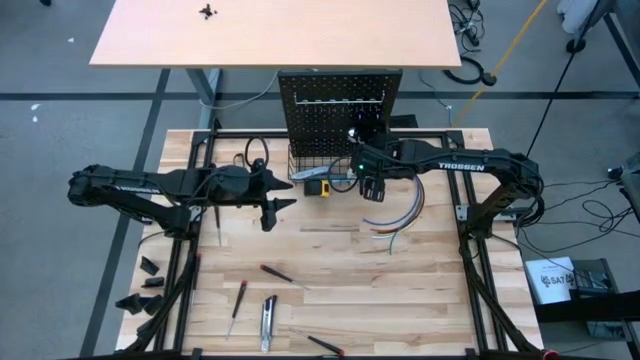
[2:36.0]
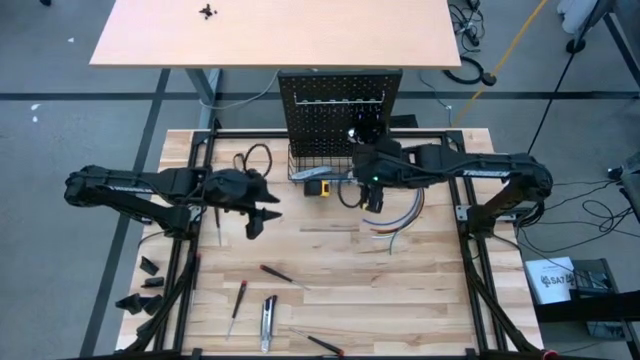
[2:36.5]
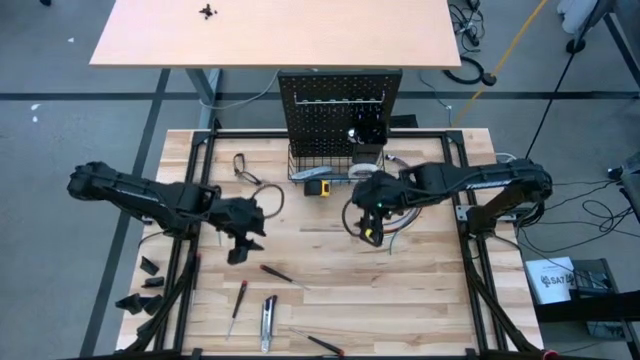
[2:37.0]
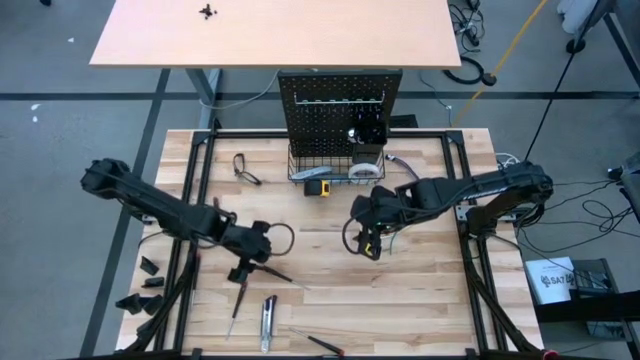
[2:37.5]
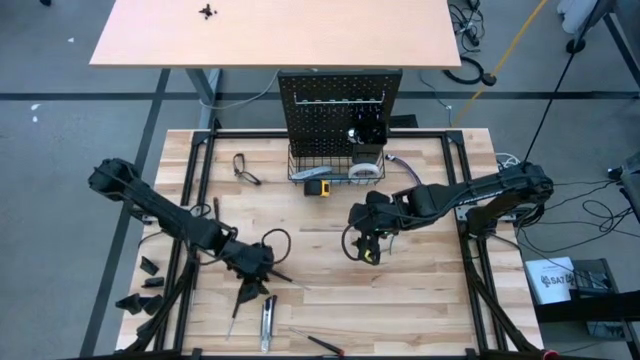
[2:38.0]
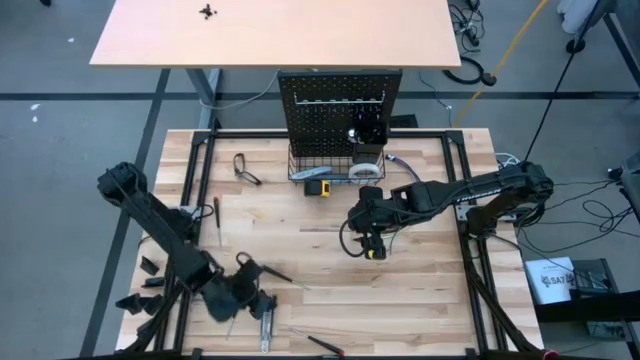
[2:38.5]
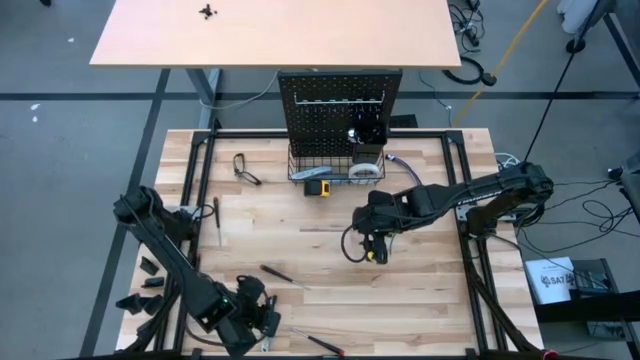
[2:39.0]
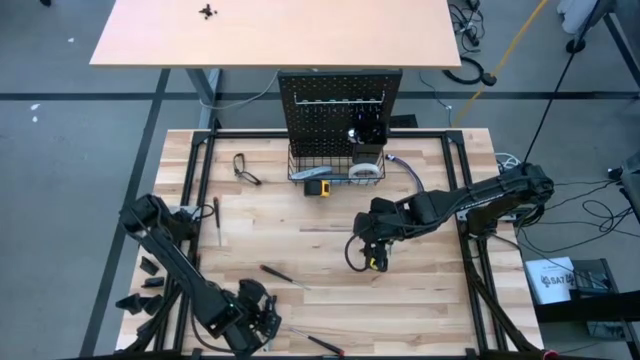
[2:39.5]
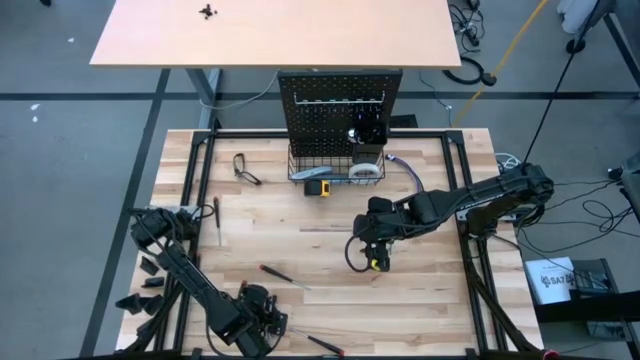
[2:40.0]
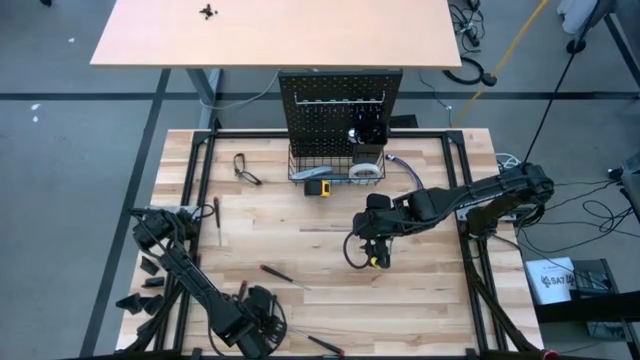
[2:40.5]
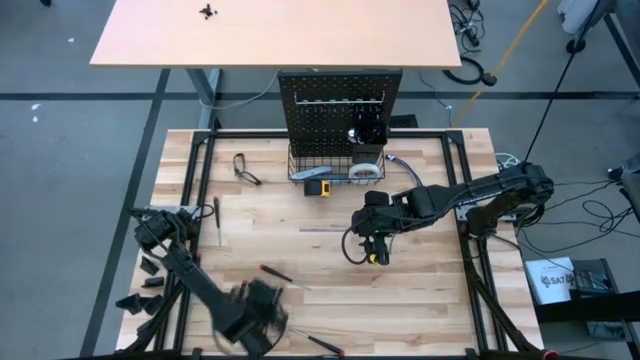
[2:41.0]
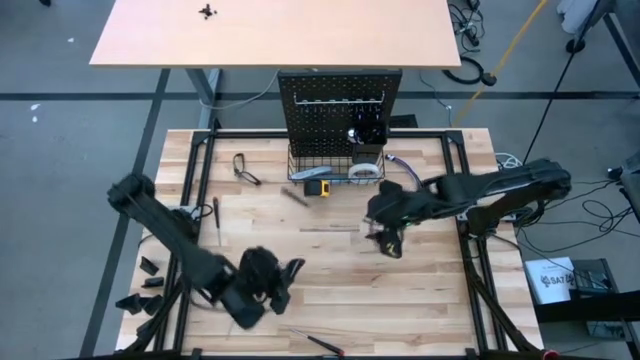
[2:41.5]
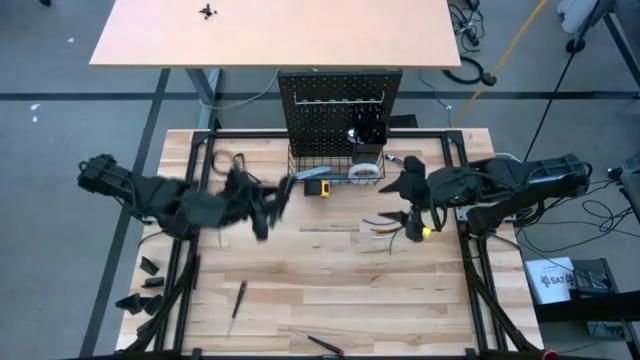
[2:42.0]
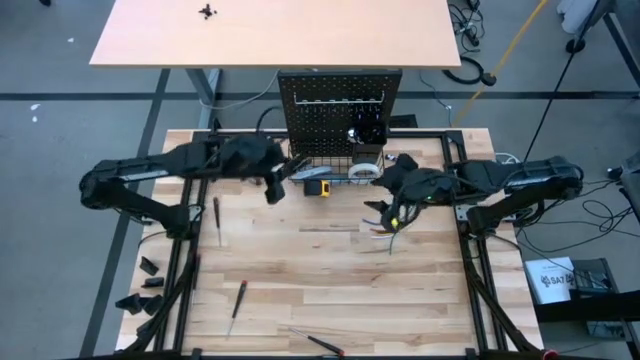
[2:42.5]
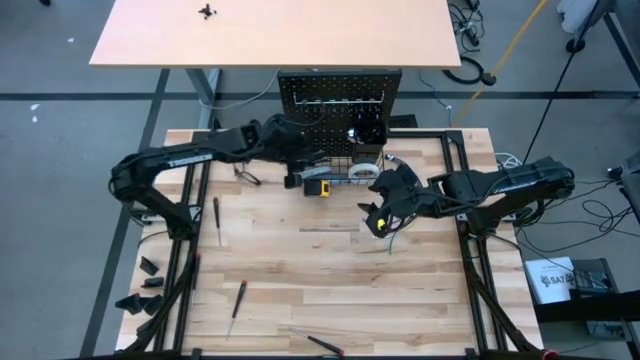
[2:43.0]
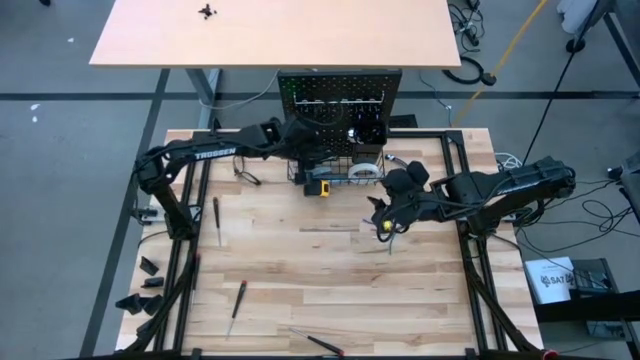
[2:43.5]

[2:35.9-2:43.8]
Task: Hang tools onto peg board
Put the black cutter into the wire basket on the pegboard

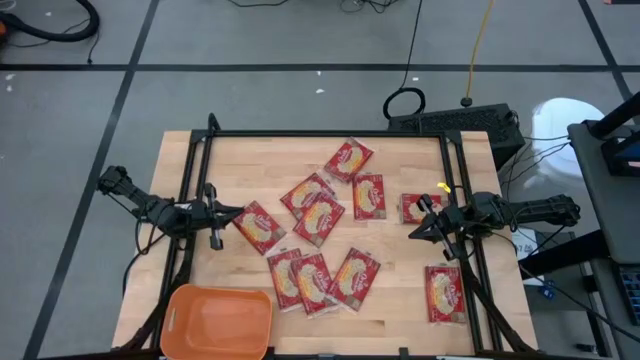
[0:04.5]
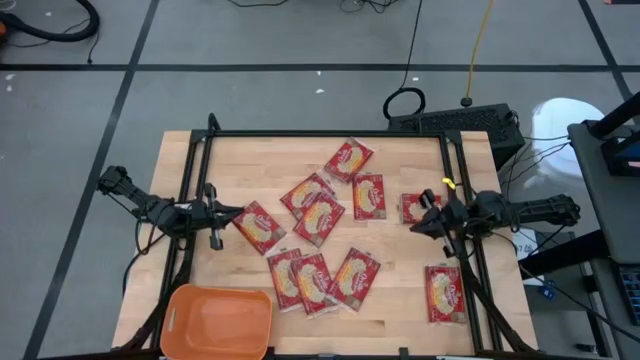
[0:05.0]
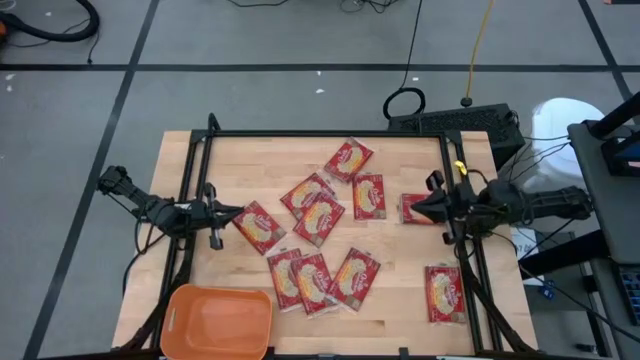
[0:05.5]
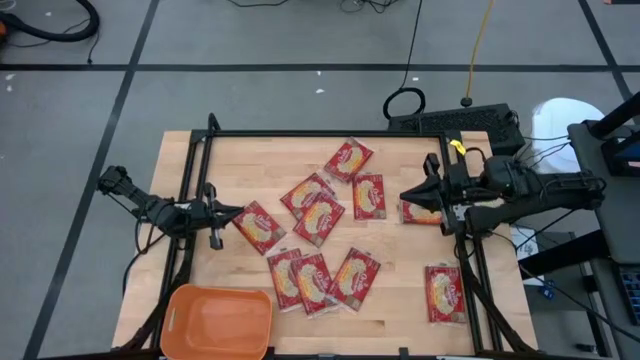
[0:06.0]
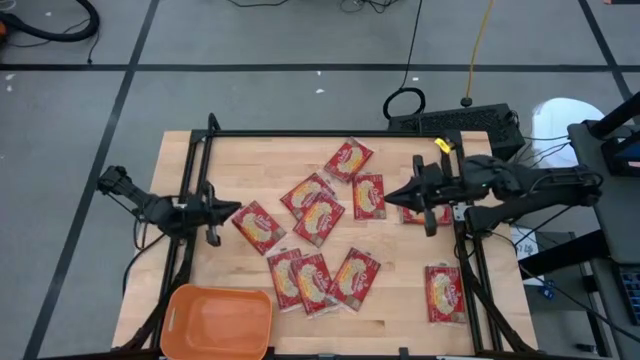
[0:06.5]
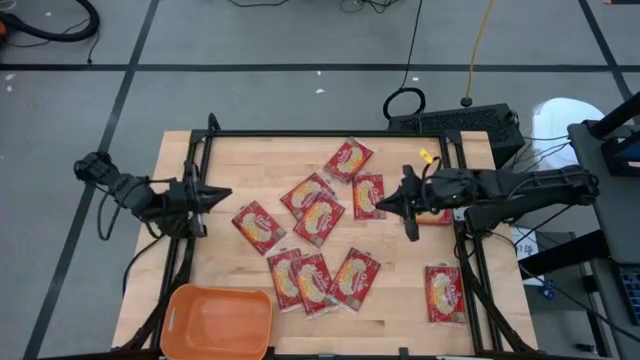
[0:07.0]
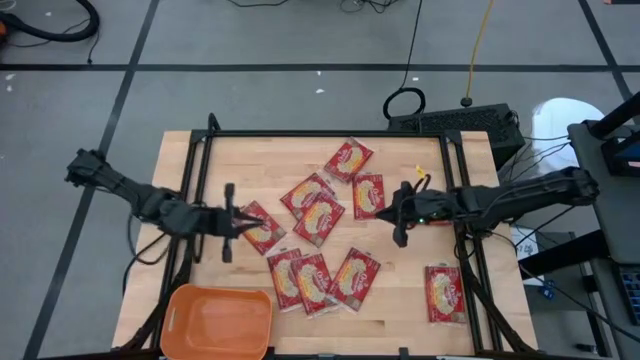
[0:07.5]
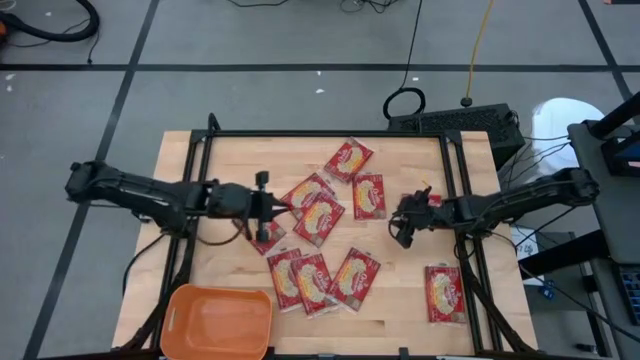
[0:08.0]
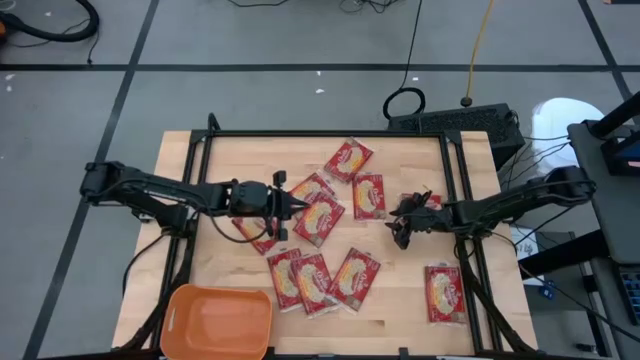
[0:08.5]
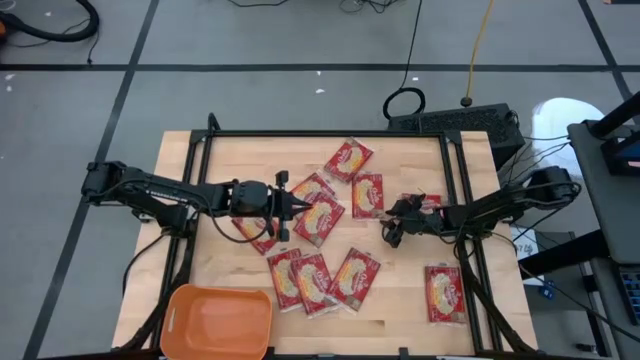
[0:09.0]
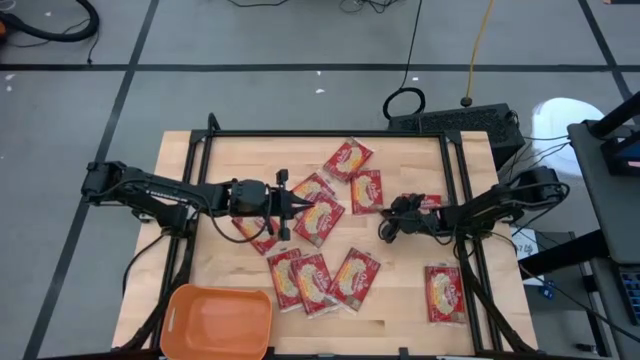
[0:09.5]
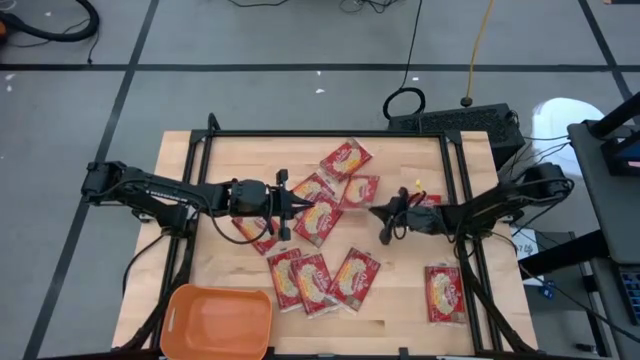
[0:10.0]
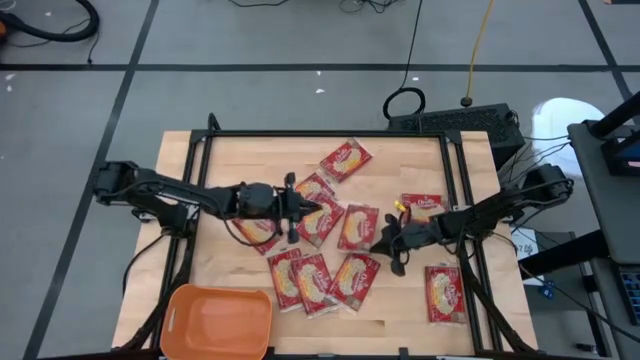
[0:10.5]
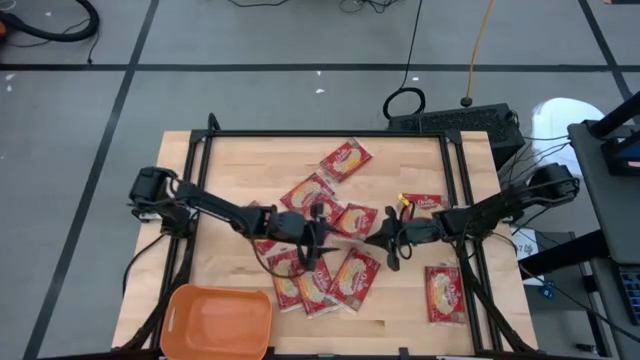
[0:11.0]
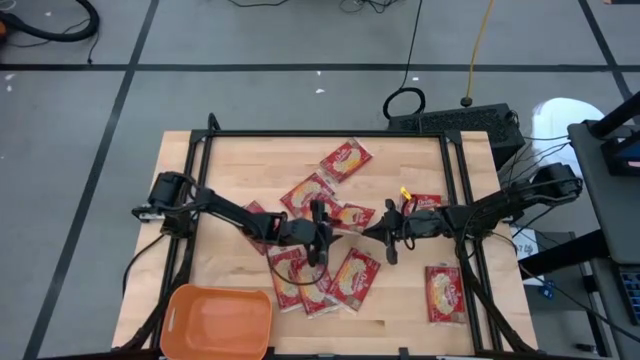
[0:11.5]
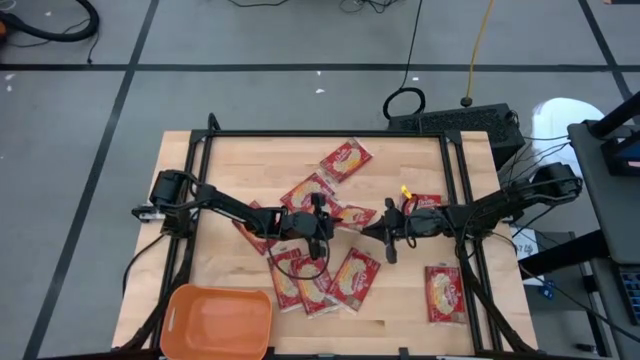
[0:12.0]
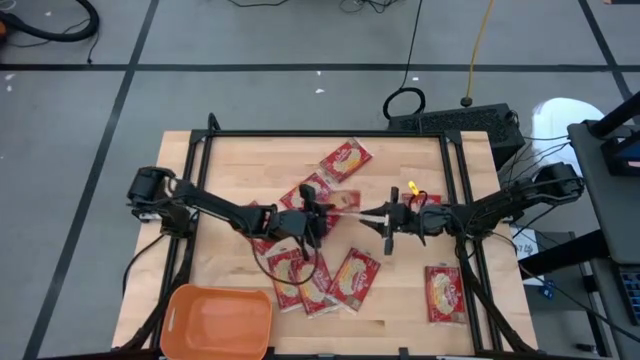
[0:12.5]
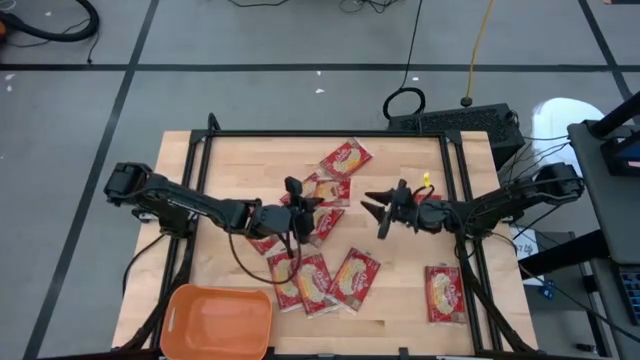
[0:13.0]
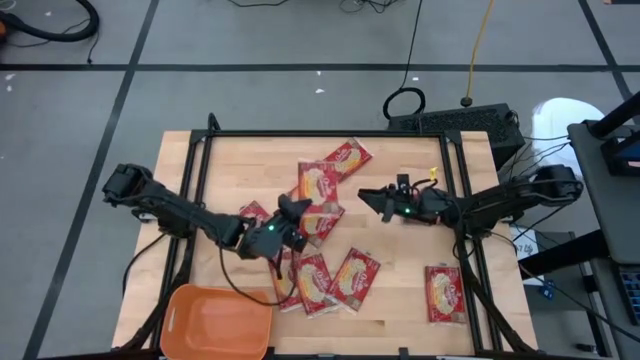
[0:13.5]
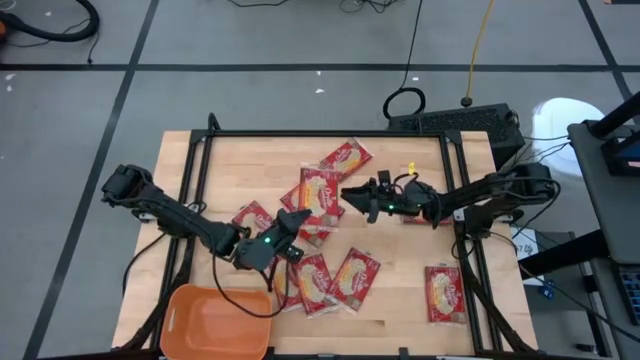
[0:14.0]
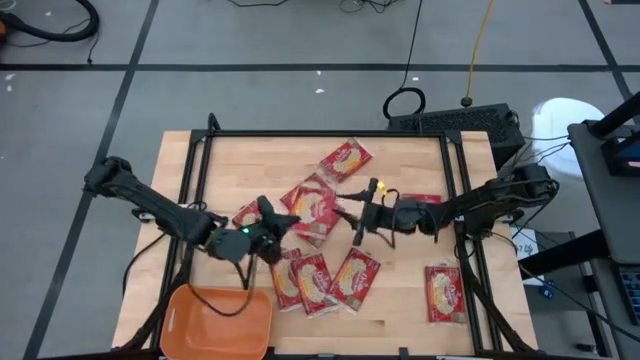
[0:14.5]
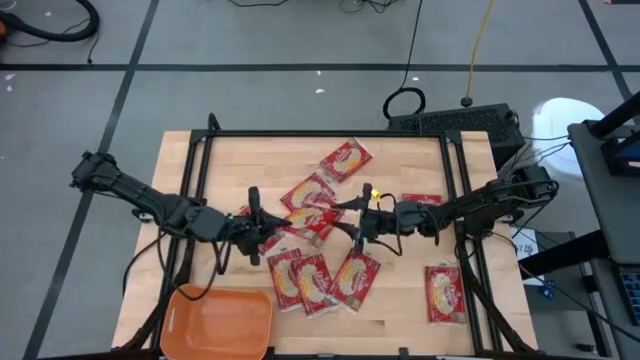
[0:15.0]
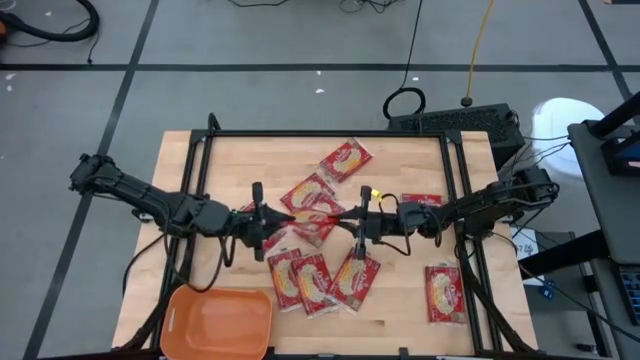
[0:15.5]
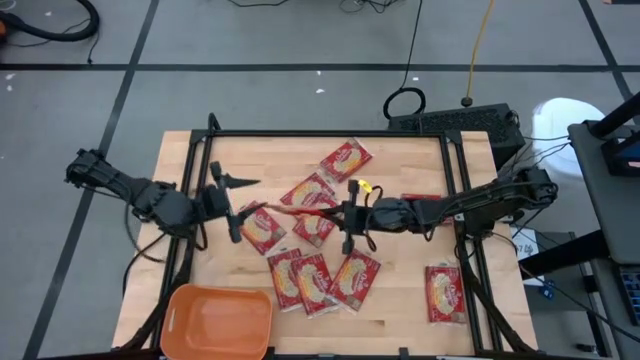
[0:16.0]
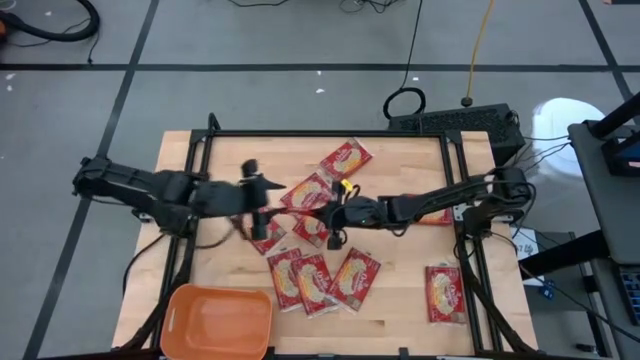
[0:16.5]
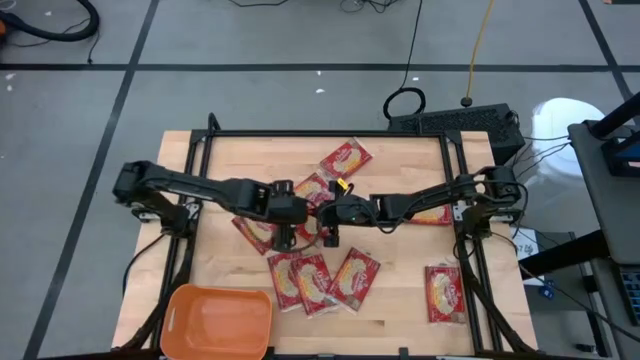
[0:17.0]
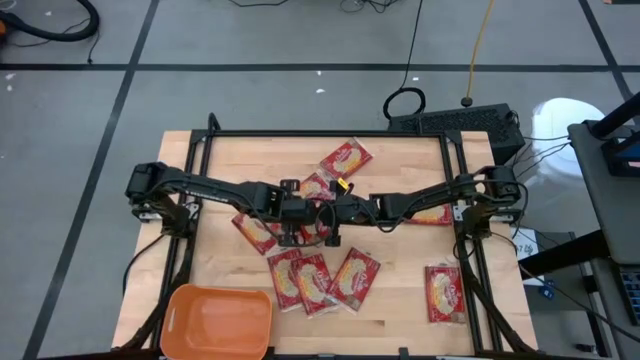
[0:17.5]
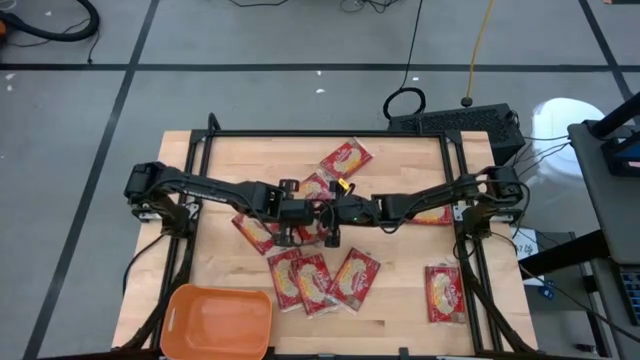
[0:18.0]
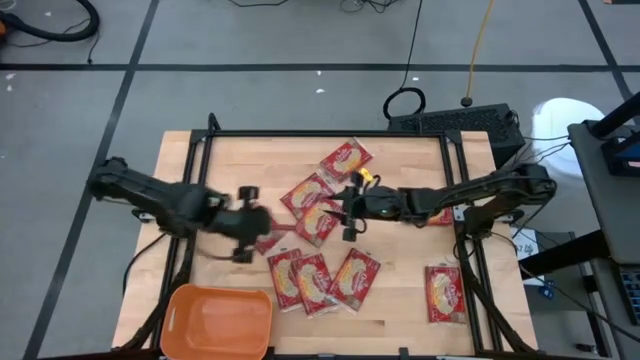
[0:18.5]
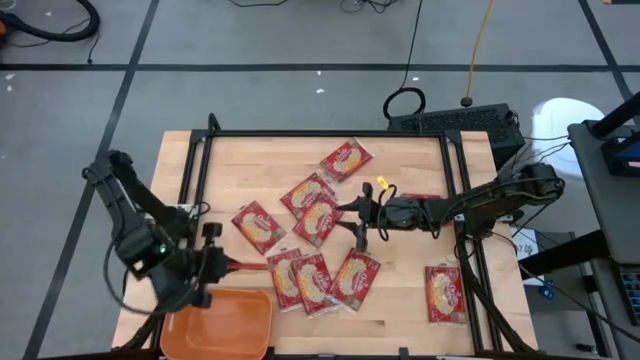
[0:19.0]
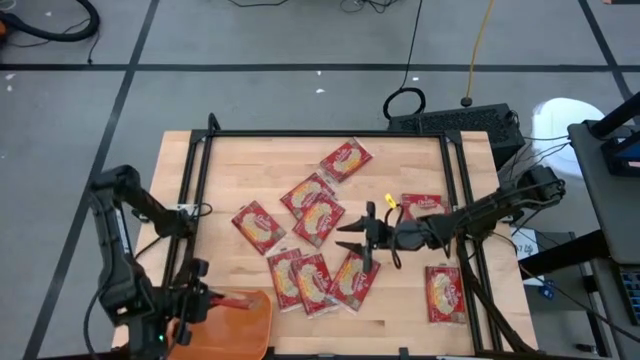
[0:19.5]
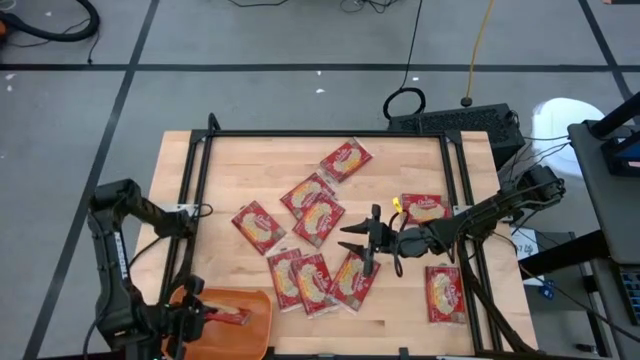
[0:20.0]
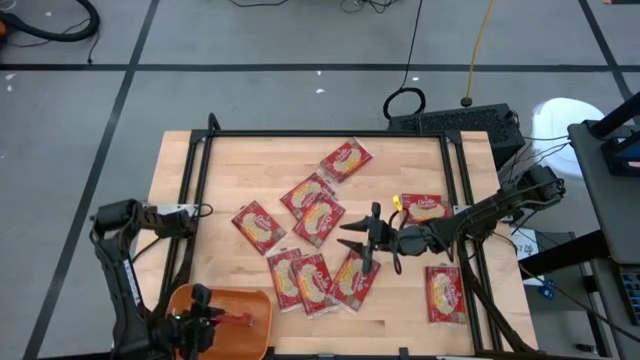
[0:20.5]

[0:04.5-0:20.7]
Task: Sort popcorn bags into baskets
Put the popcorn bag into the orange bin
